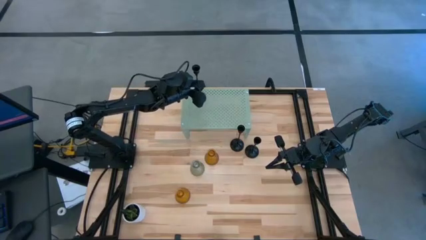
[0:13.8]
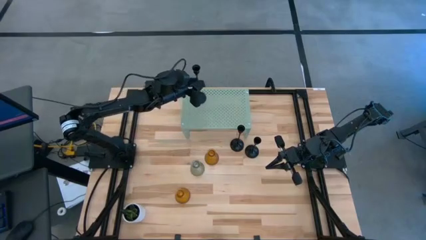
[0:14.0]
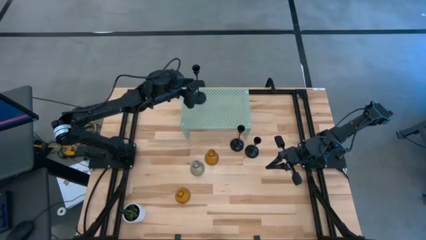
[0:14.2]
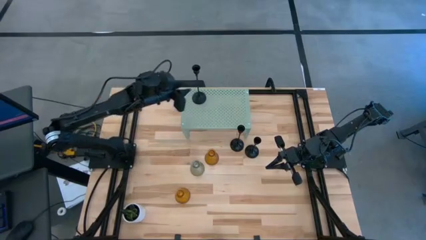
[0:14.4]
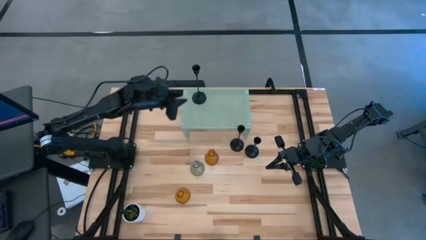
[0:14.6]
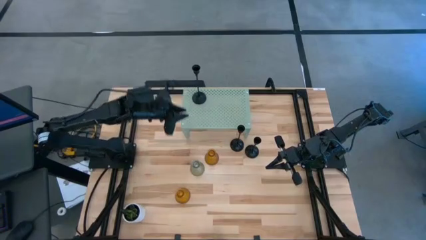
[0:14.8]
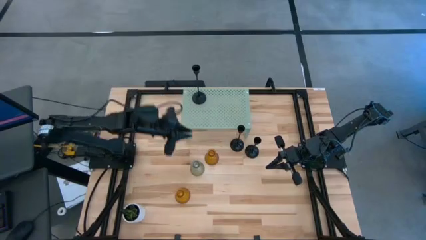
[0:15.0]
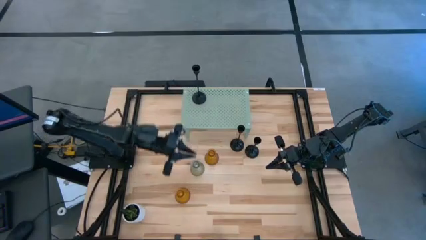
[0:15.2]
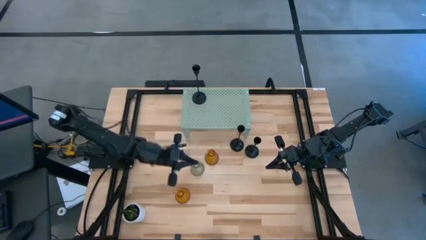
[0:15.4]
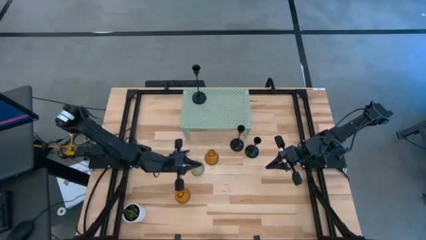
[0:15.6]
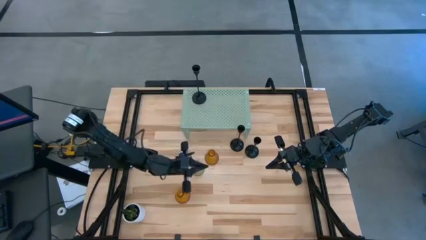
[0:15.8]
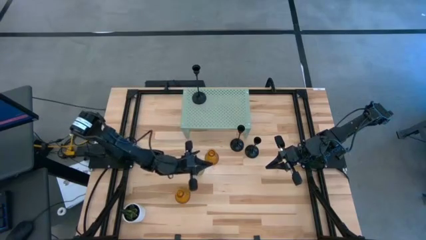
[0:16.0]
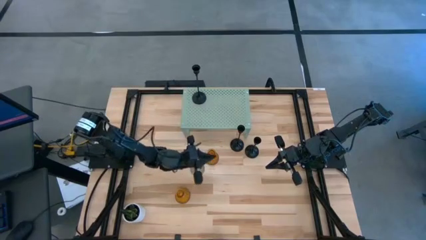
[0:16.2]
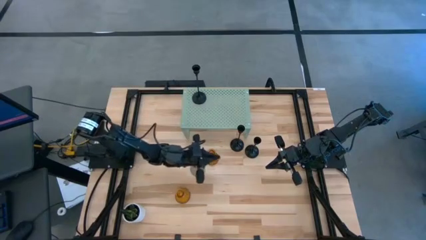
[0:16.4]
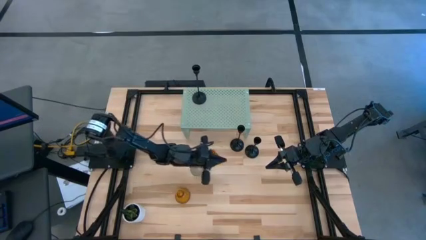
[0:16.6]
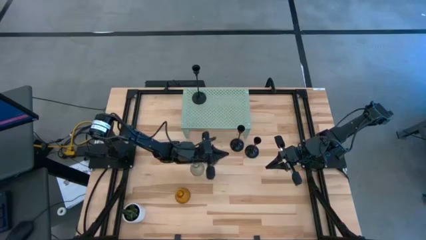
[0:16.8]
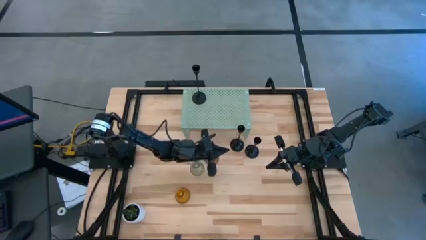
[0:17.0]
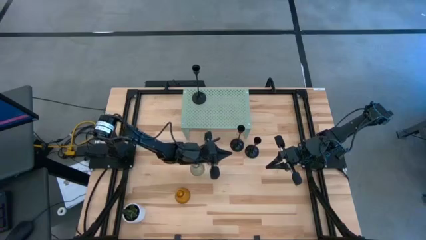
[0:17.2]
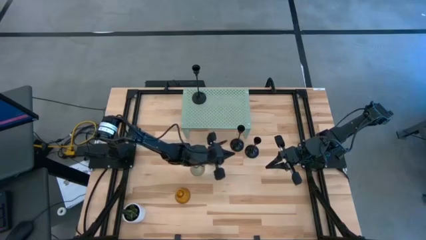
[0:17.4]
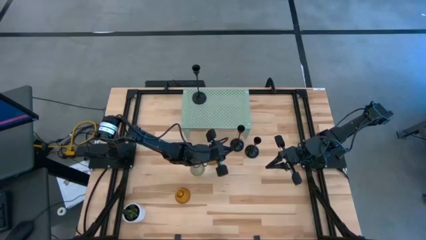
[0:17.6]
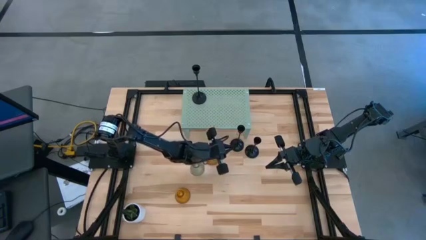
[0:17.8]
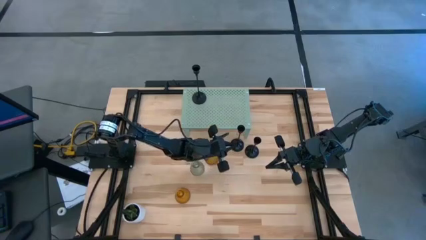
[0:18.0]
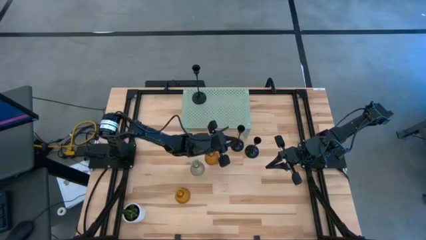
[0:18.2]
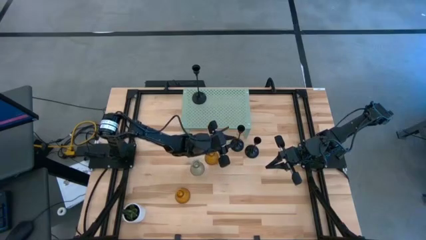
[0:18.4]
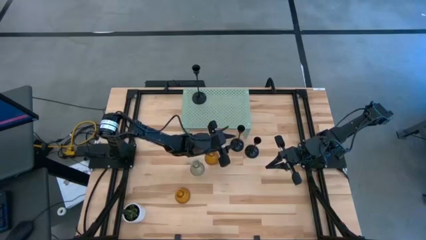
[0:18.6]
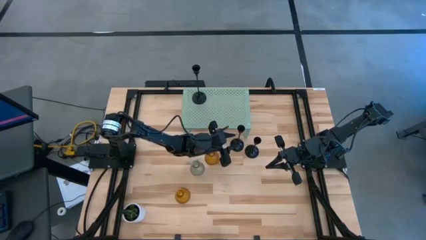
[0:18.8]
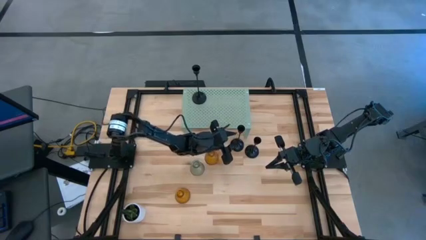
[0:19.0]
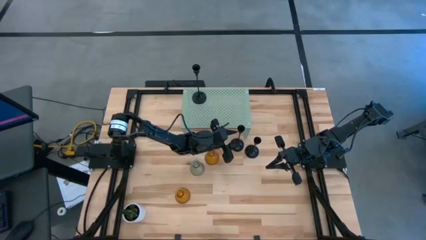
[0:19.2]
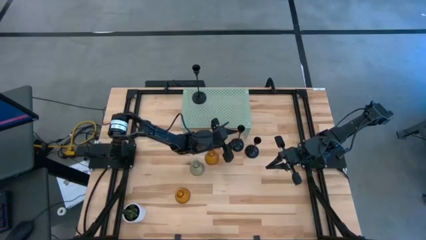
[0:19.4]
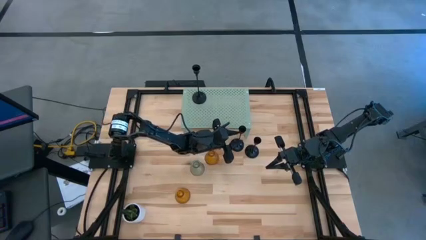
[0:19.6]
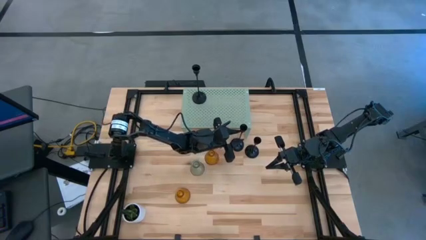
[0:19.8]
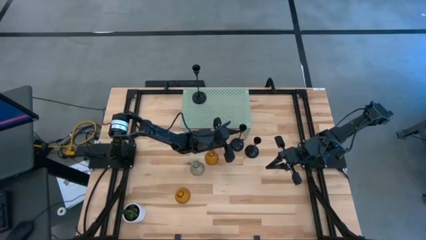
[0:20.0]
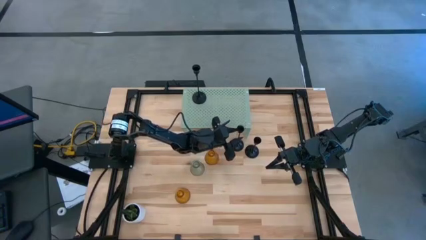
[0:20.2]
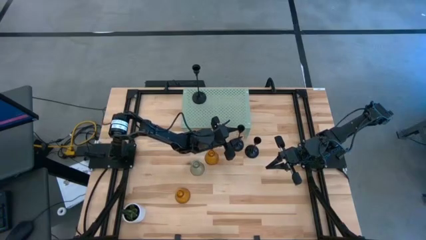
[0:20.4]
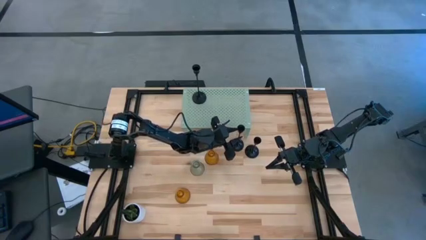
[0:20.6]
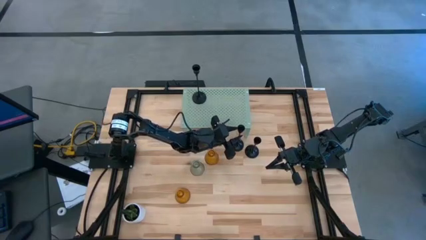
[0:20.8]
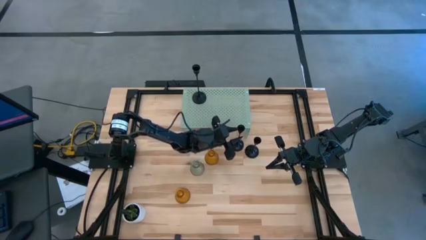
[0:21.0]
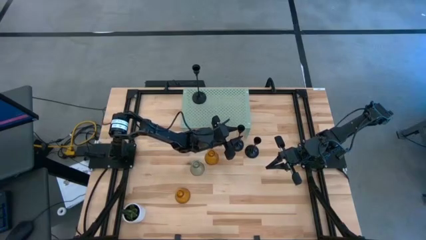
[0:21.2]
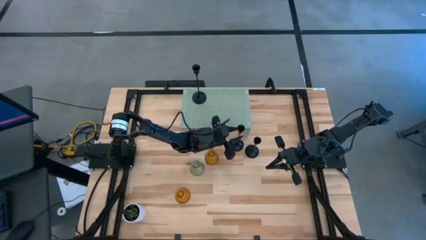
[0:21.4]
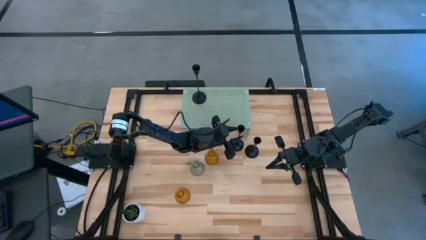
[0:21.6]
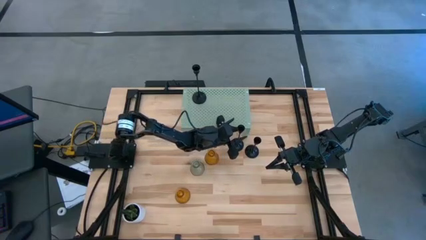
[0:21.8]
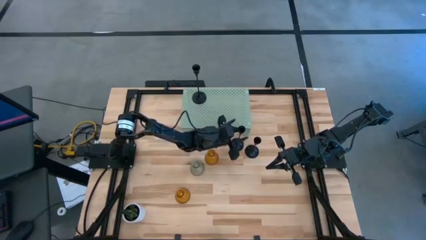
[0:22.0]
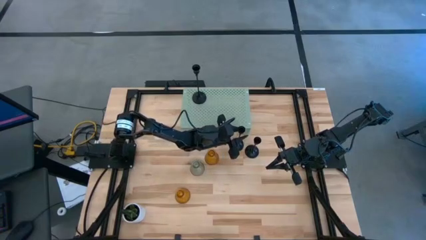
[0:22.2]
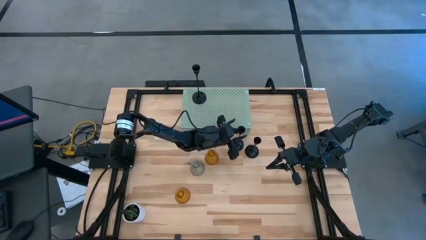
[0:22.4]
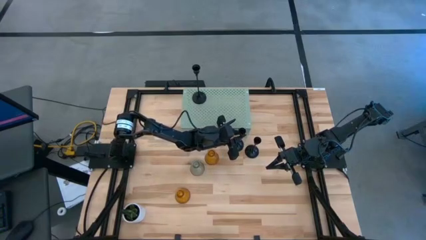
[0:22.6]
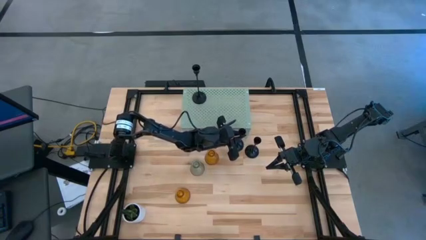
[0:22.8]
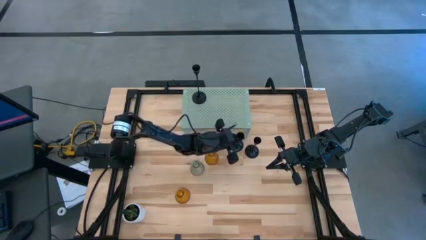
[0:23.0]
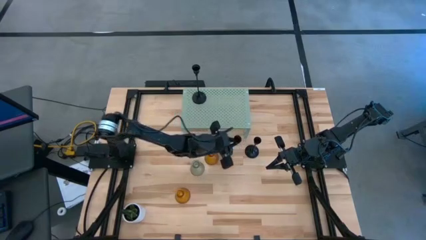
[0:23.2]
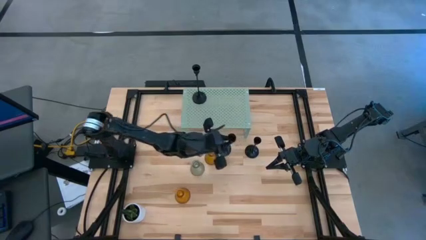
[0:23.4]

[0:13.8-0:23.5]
Task: Pick & Place candle stick holders
Put the top black candle holder on the shelf aligned with the other black holder

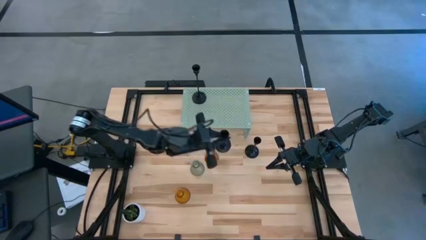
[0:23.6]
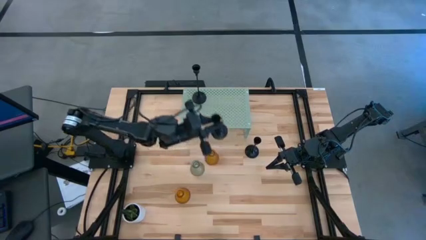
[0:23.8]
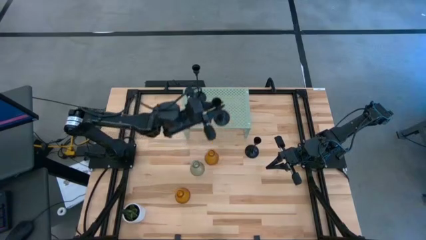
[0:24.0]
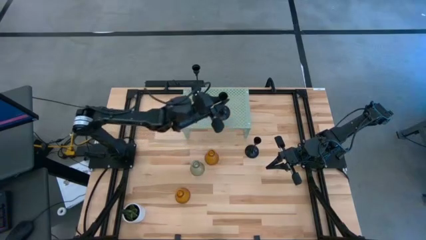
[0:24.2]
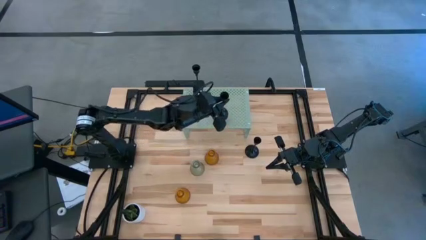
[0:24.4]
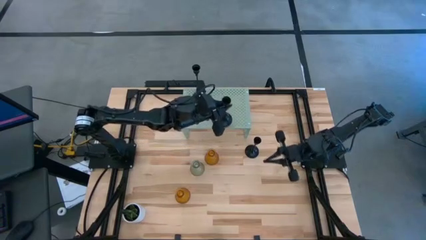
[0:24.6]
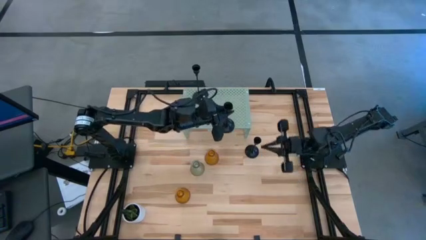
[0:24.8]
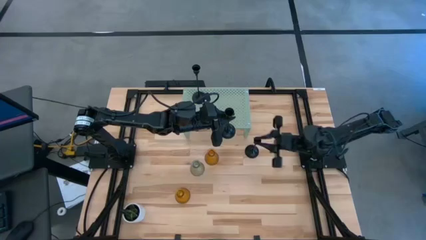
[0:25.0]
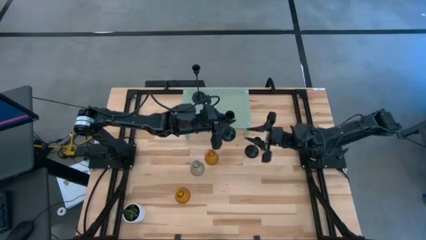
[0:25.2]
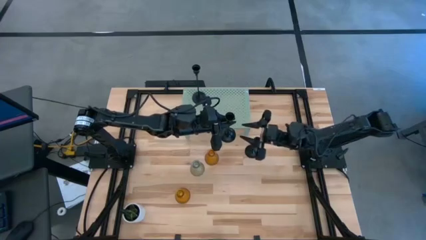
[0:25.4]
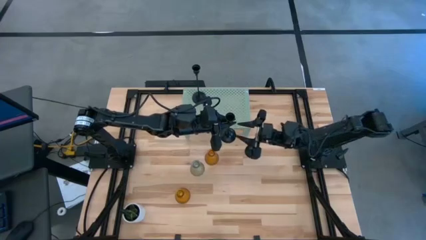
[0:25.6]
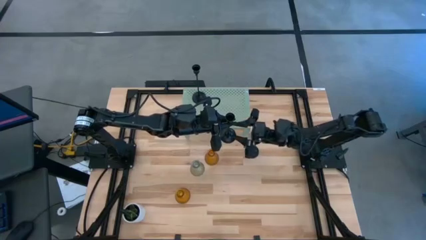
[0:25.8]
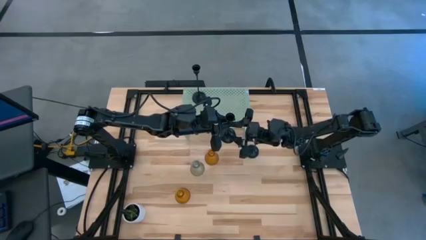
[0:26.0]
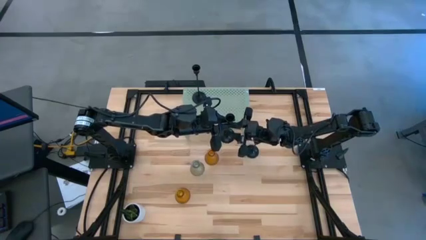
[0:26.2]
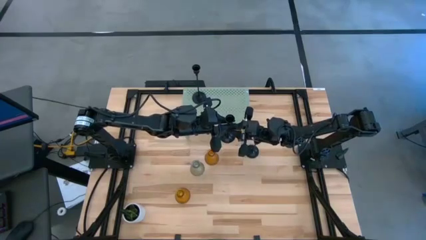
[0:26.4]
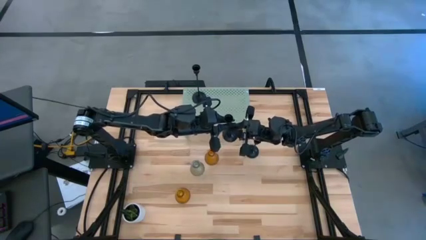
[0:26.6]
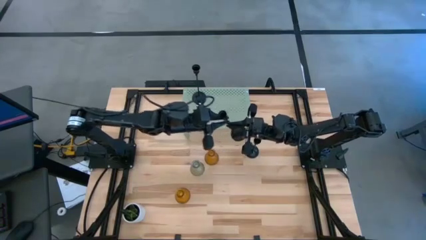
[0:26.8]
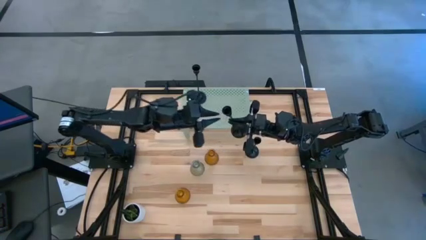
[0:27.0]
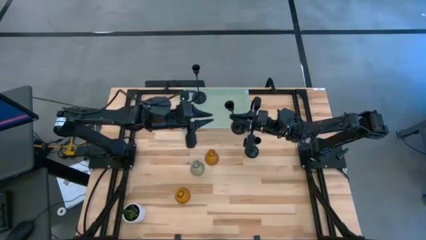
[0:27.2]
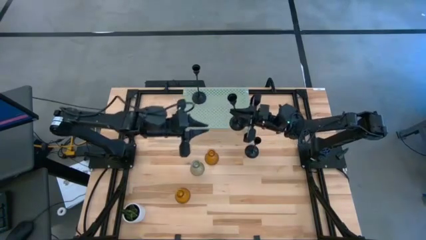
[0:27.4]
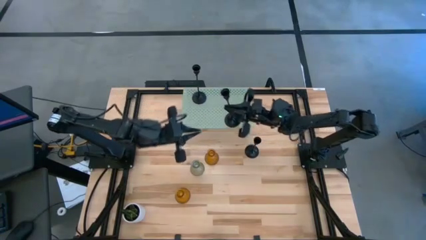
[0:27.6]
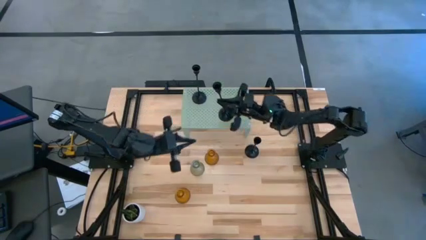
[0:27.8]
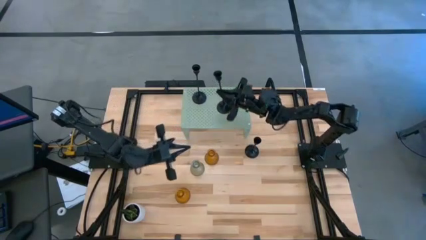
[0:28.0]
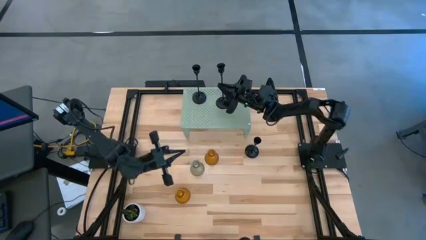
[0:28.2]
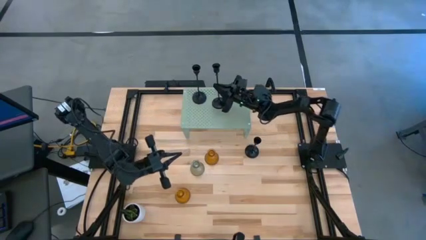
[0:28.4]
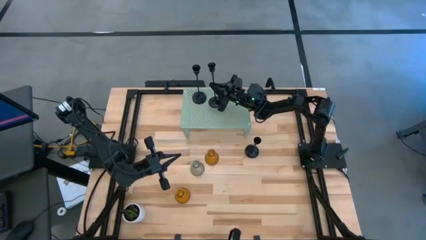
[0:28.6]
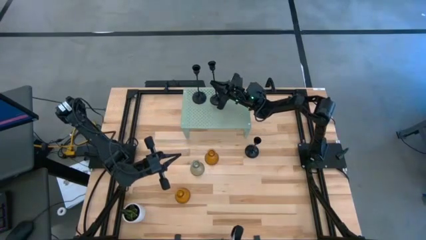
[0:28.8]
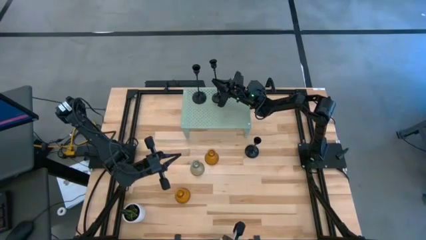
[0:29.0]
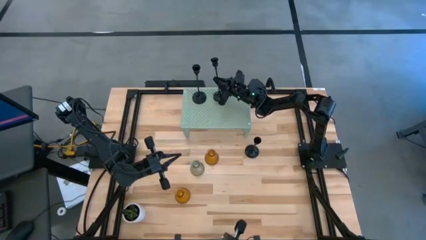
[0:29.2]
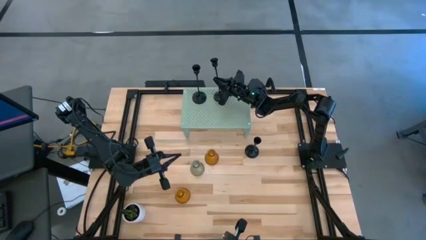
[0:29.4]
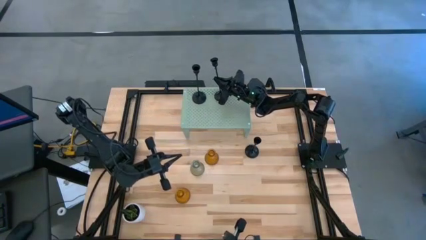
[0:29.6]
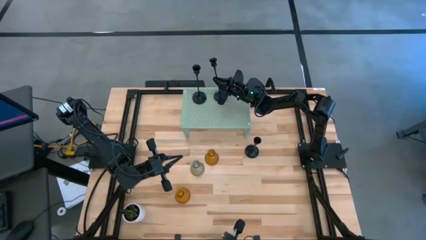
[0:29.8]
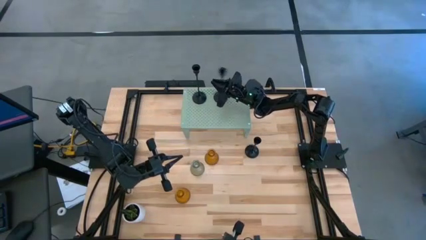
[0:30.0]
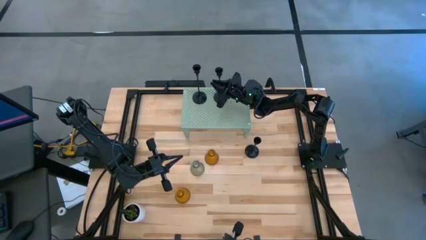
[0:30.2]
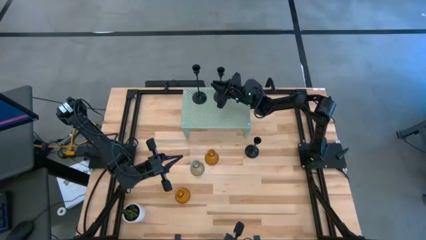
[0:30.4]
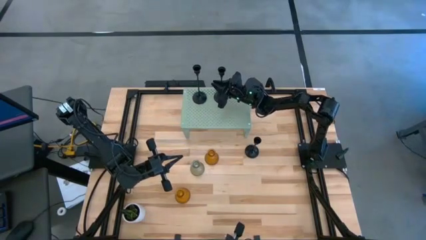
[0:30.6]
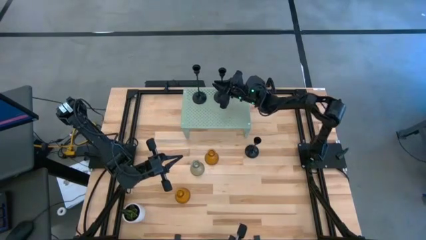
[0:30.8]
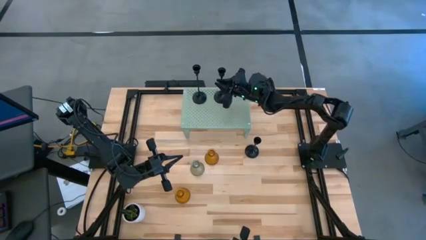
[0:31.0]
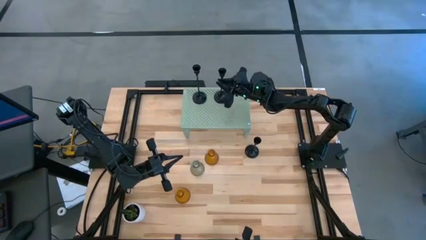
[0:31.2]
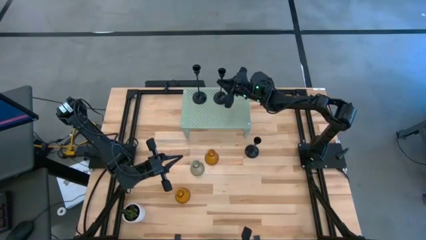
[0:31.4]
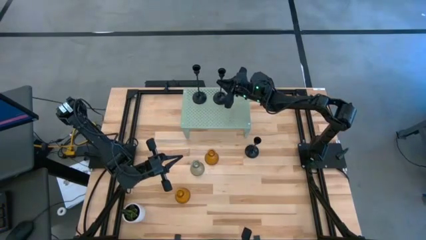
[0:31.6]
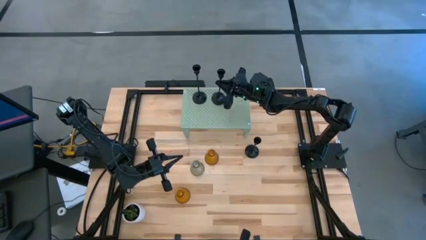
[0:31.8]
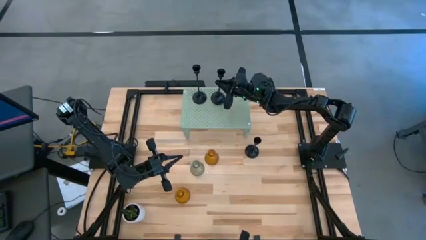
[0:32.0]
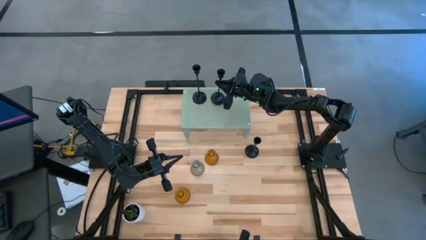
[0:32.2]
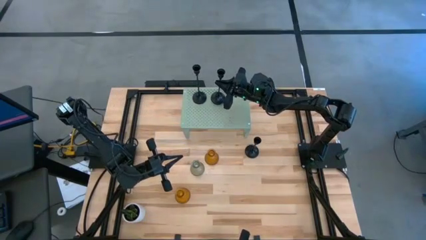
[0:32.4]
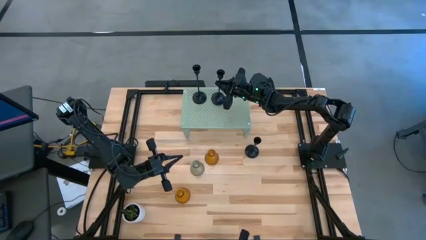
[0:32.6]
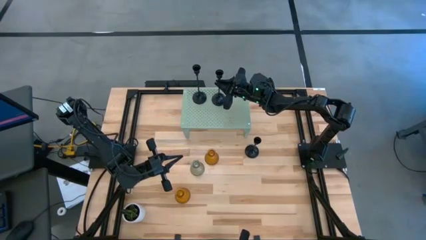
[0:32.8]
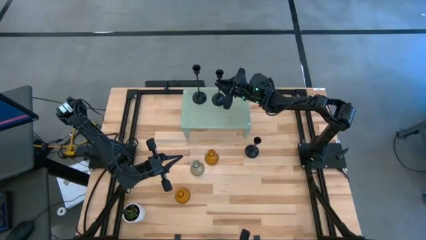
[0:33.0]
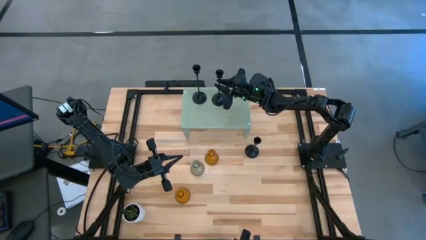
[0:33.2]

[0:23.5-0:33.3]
Put the top black candle holder on the shelf aligned with the other black holder
